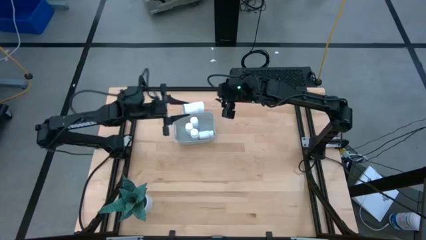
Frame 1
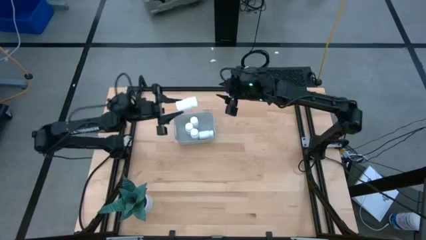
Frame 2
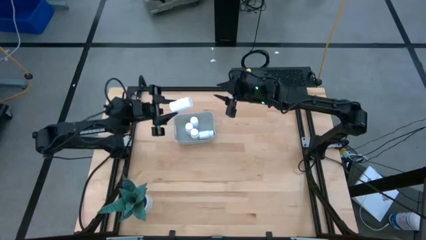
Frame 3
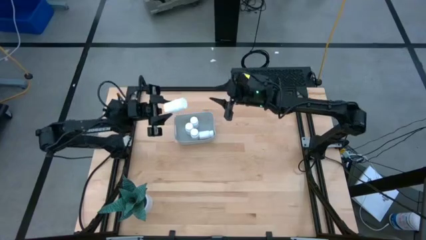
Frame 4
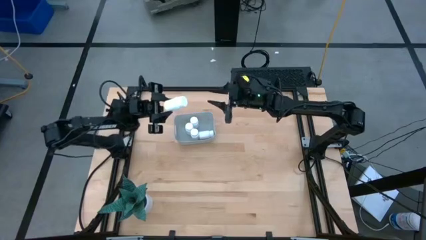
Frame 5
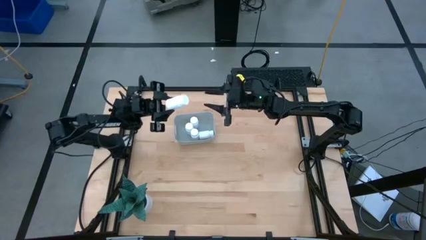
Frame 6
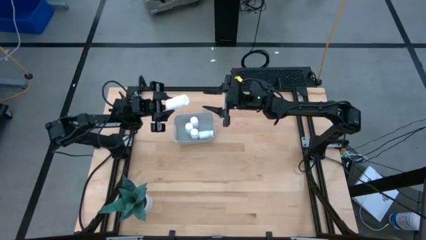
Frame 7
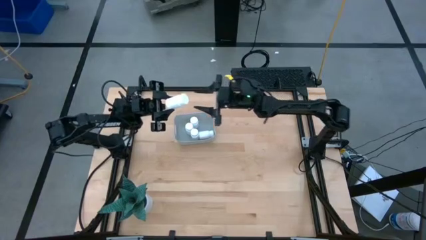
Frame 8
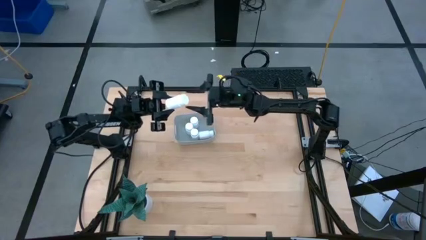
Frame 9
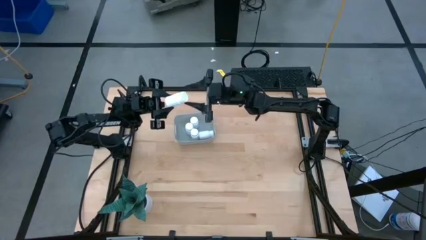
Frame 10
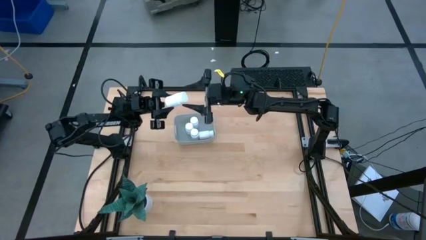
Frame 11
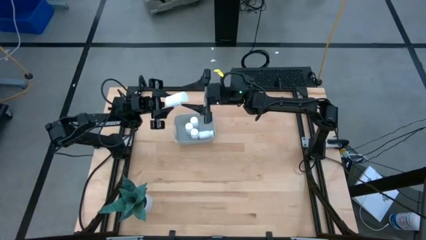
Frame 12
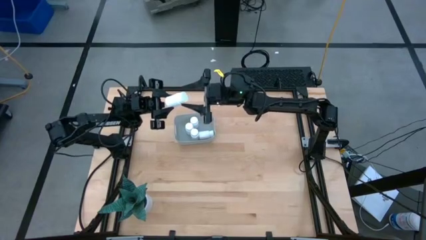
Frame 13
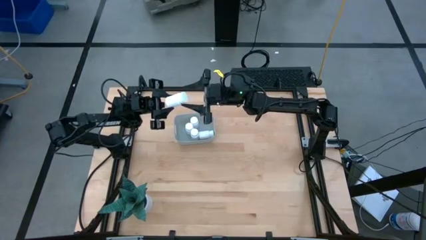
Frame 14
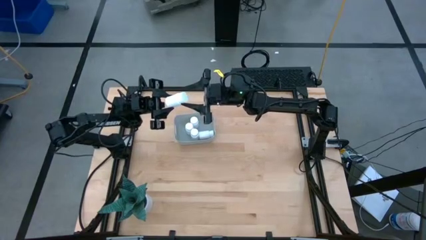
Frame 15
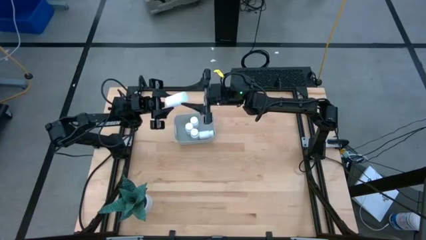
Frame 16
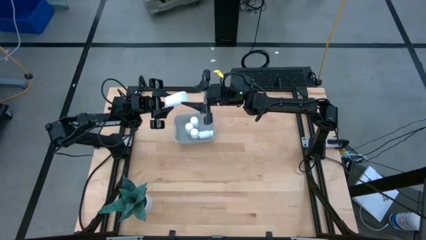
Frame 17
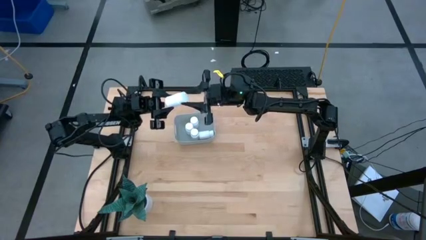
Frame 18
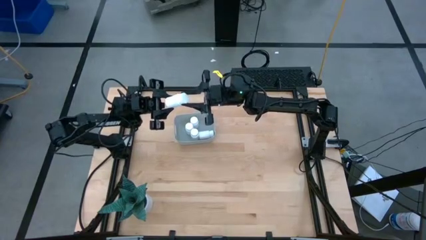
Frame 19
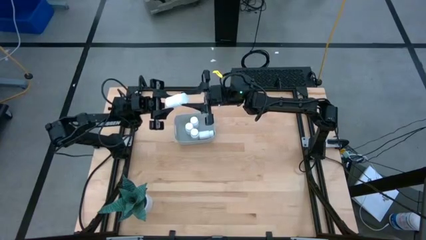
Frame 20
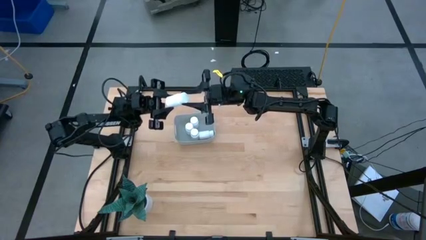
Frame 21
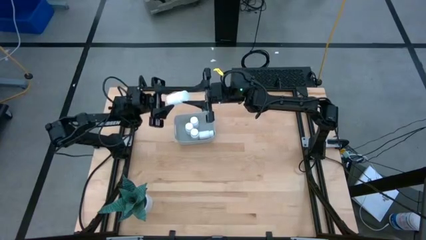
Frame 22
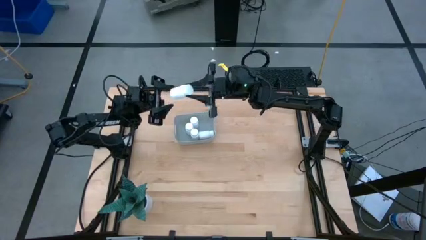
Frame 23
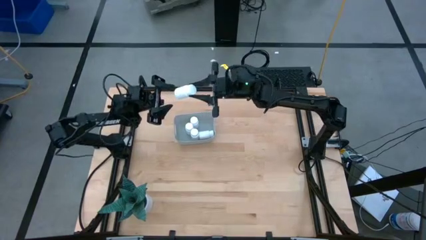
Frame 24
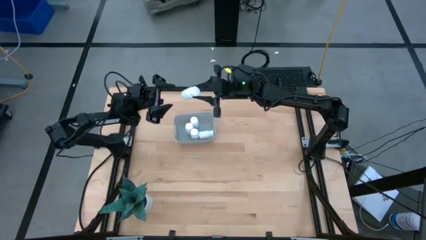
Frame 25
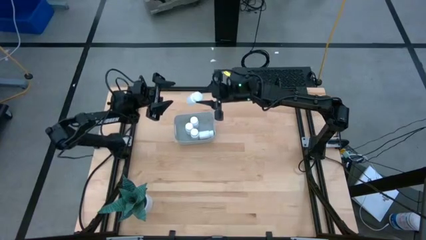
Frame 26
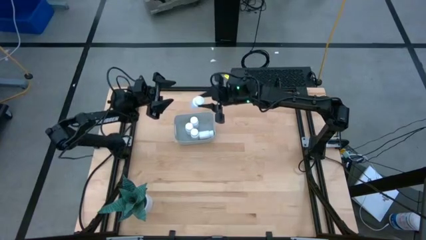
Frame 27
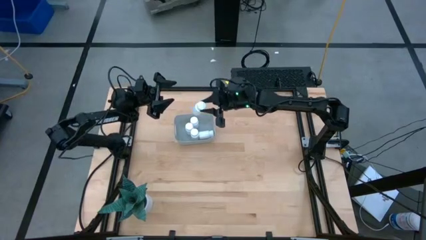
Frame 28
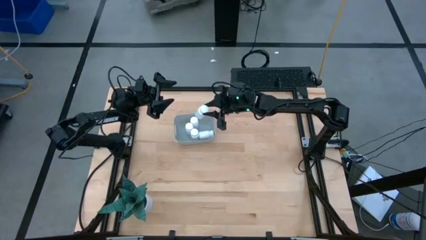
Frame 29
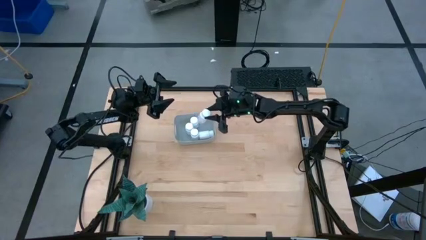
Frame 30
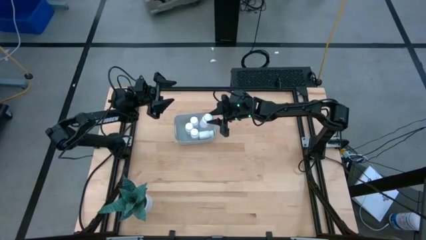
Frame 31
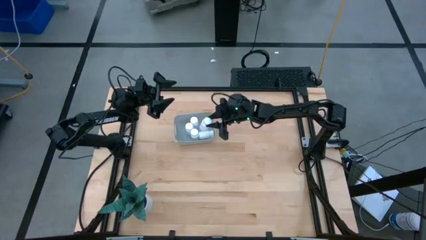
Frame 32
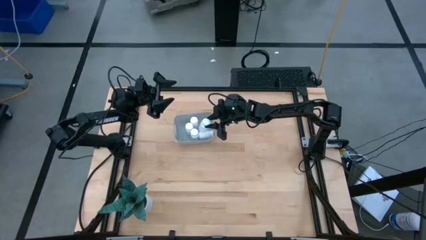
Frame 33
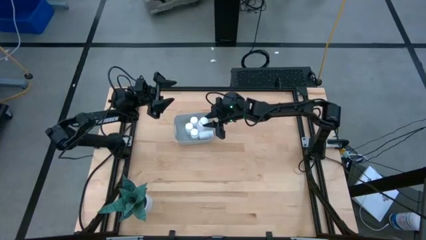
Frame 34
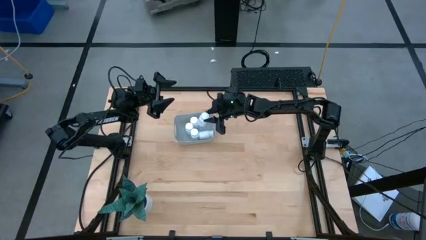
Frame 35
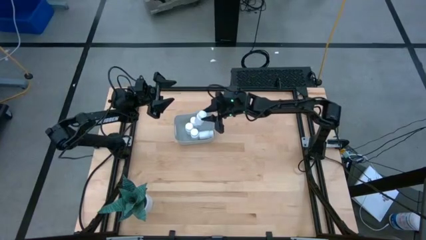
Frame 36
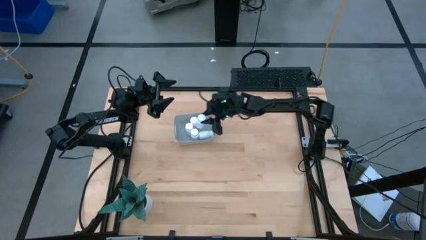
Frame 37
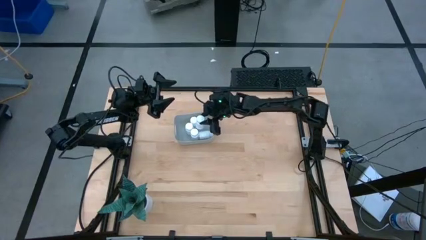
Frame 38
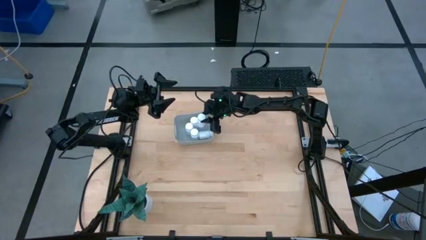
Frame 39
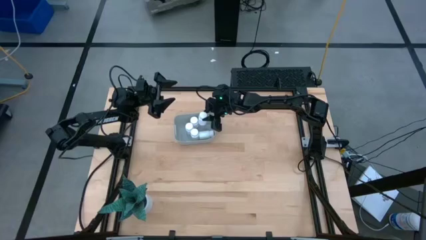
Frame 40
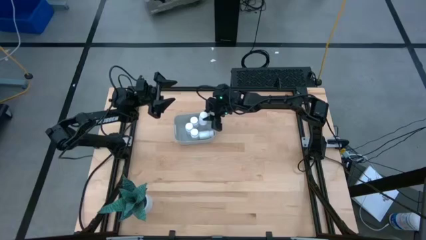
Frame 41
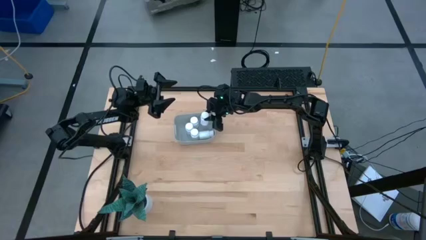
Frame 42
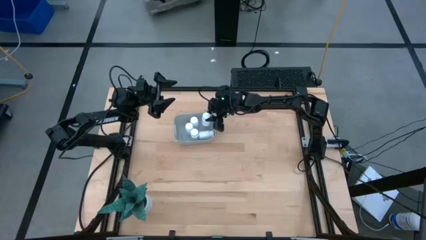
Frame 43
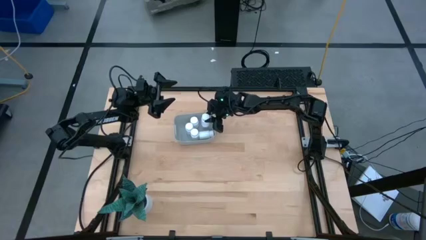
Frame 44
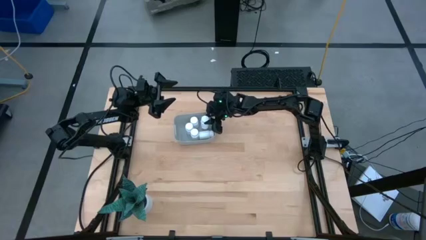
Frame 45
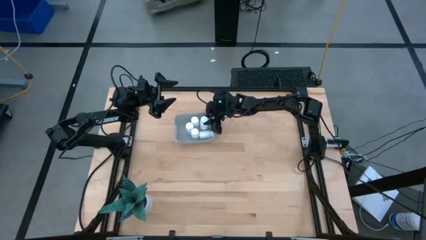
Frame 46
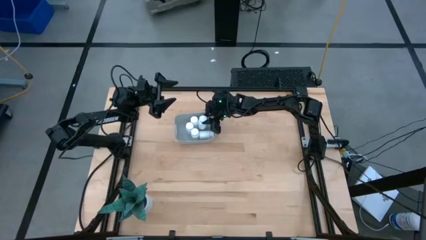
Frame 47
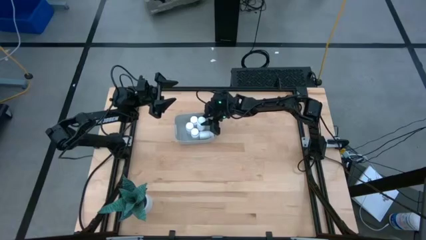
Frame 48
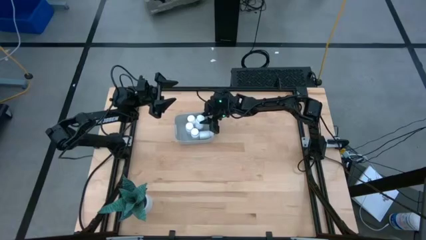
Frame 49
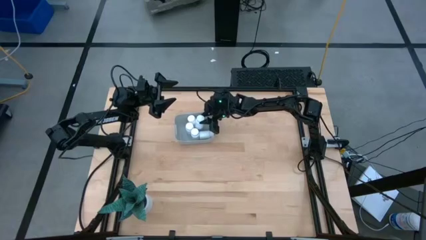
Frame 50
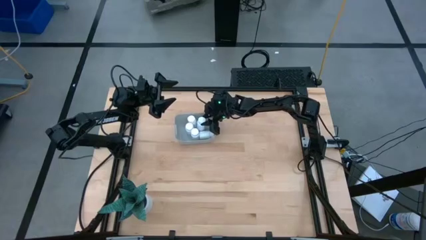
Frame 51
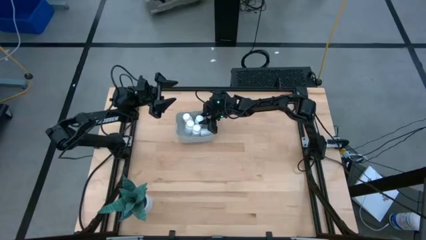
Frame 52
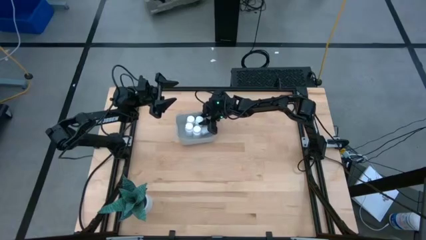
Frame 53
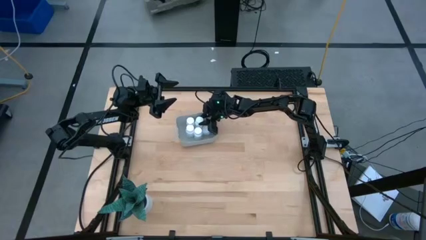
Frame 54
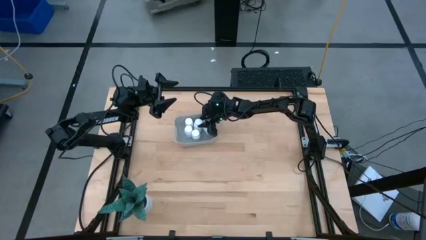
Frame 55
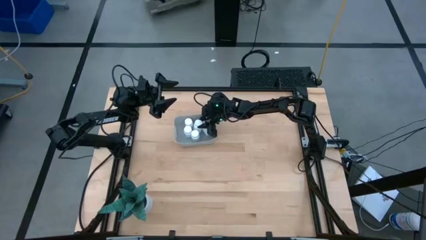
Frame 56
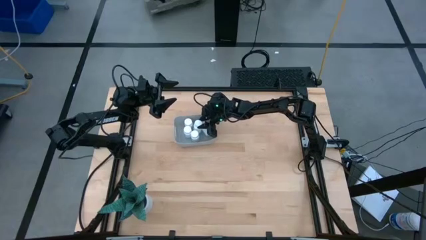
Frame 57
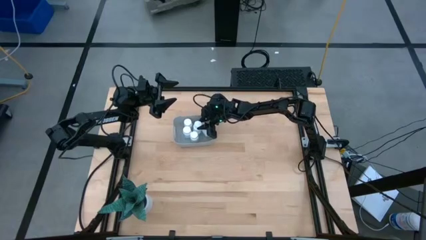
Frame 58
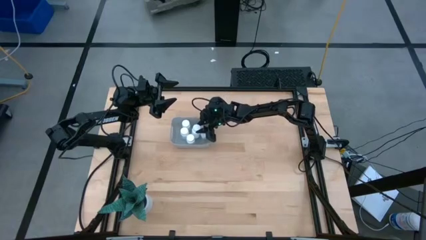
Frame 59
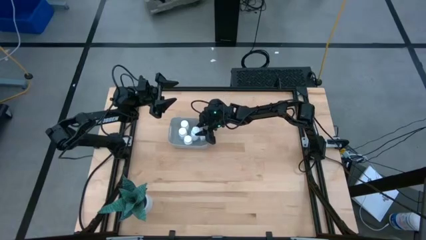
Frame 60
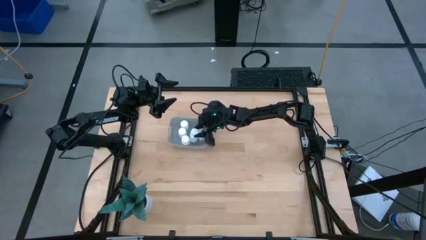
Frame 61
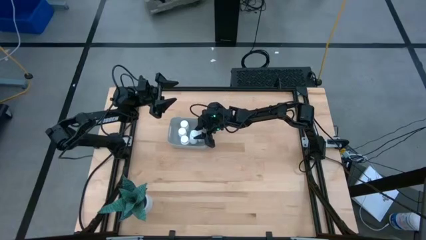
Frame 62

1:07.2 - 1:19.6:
Task: Pick and place pill bottles into a basket
Adjust the white pill bottle in the gray bin

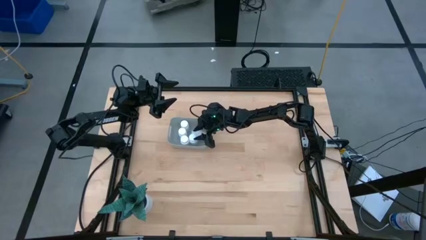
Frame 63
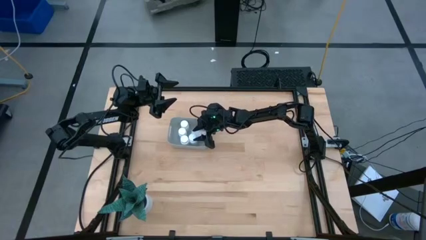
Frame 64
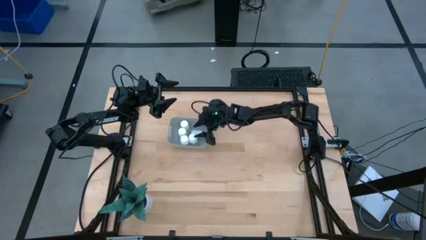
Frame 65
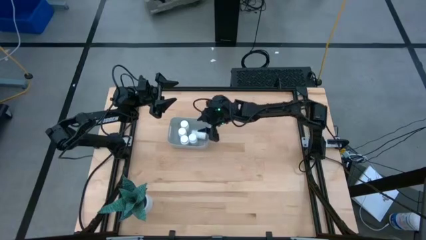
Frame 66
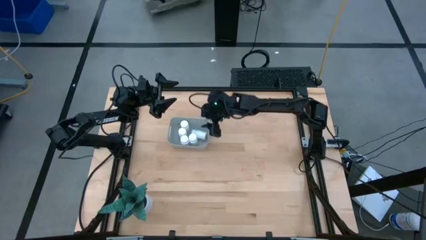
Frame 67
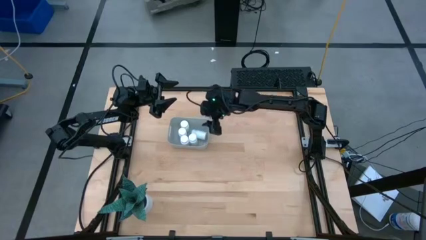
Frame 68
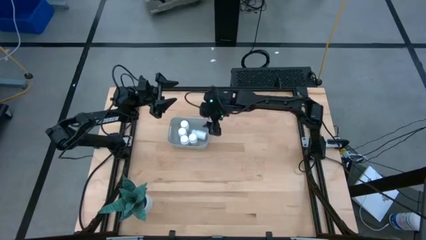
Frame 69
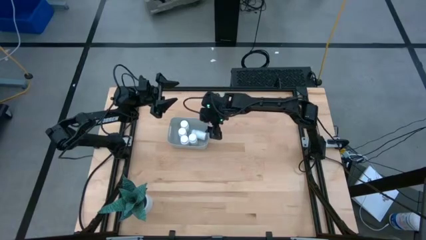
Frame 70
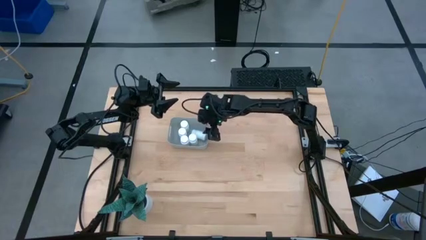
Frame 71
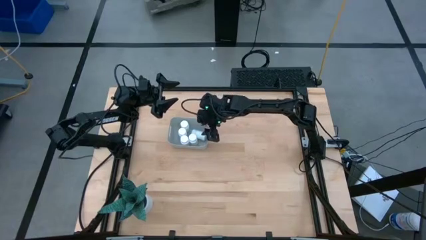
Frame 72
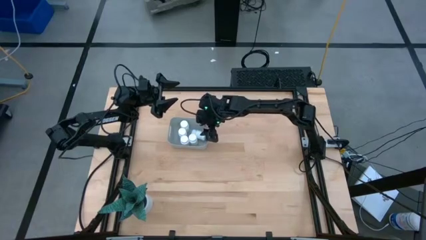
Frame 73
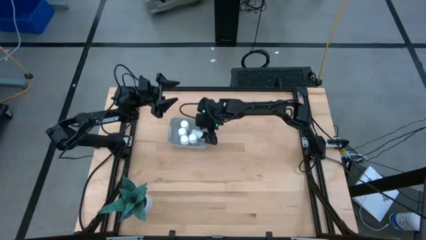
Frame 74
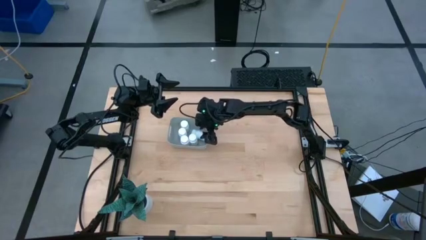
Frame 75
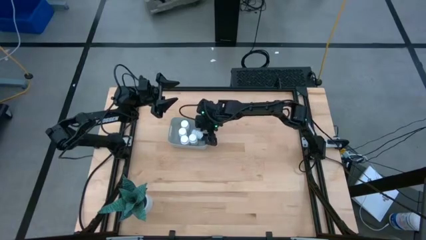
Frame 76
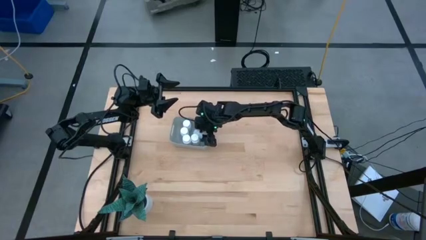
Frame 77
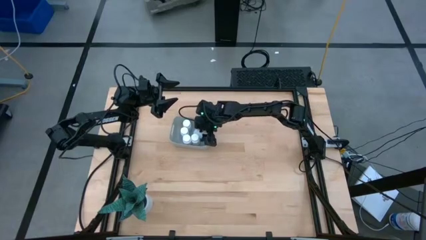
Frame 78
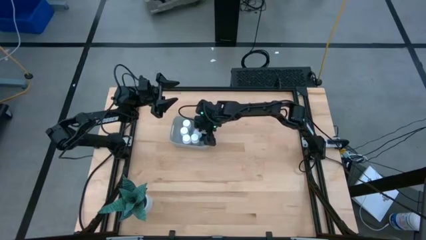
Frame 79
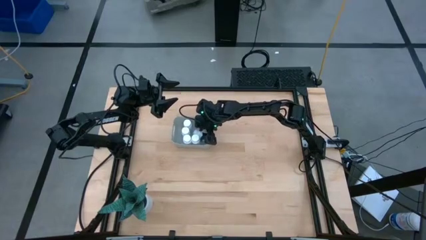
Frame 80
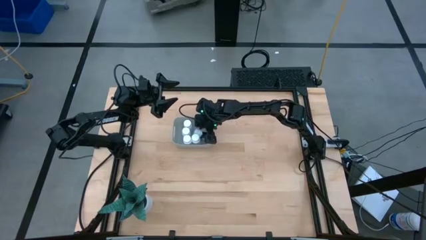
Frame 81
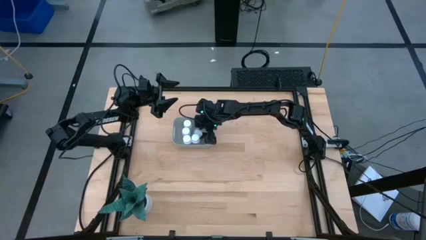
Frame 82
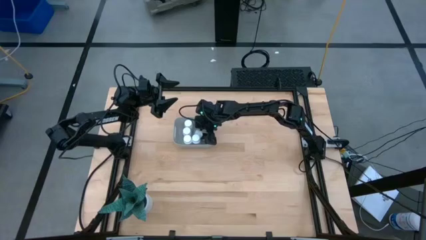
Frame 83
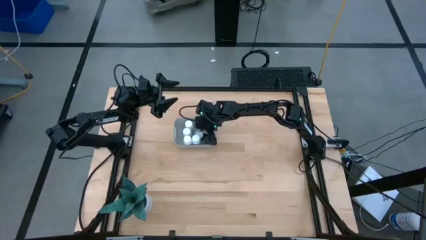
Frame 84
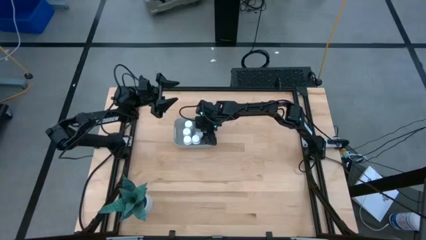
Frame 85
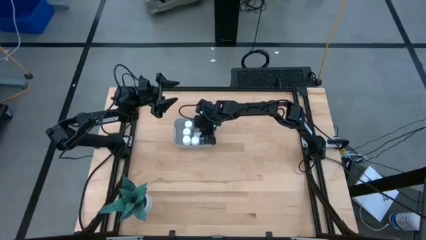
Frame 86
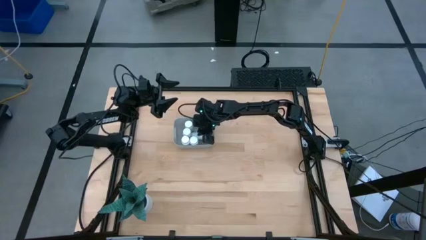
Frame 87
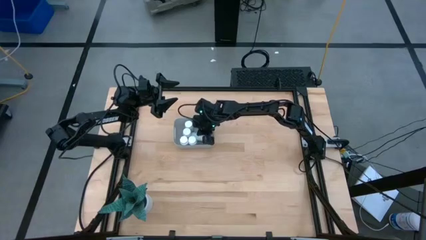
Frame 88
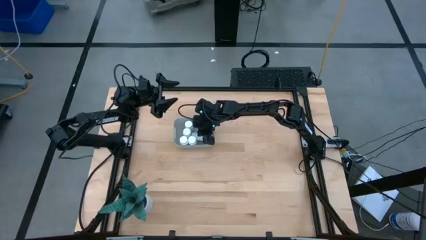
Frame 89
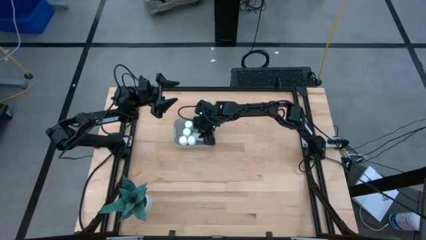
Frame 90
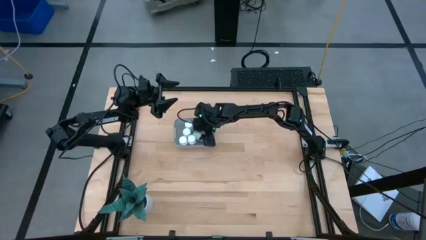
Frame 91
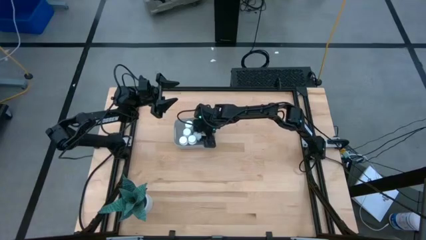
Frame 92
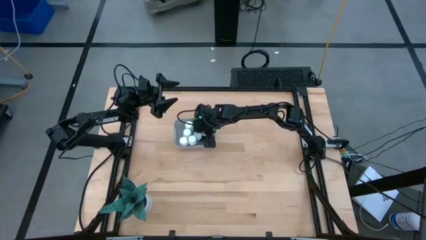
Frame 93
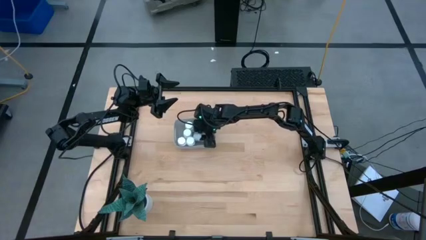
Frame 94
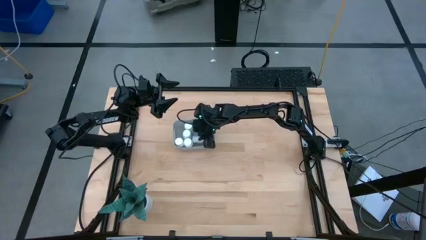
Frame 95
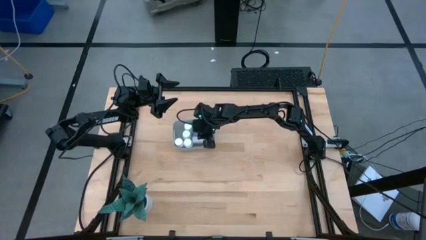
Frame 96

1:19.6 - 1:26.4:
Adjust the white pill bottle in the gray bin
